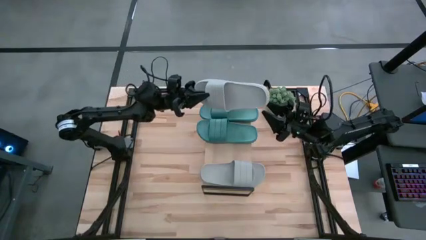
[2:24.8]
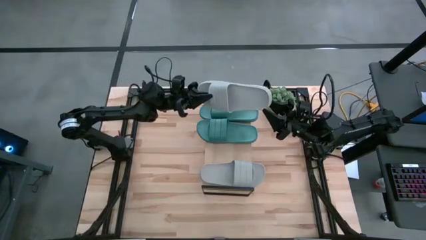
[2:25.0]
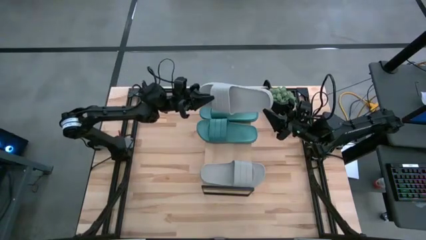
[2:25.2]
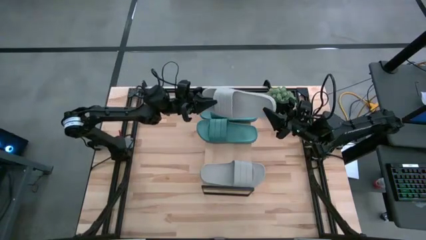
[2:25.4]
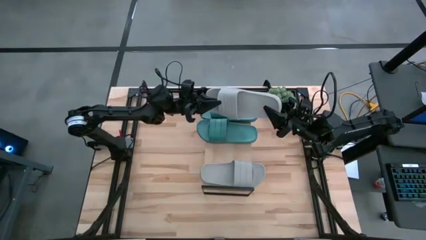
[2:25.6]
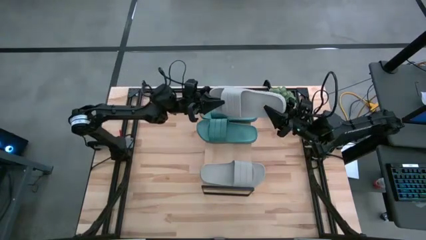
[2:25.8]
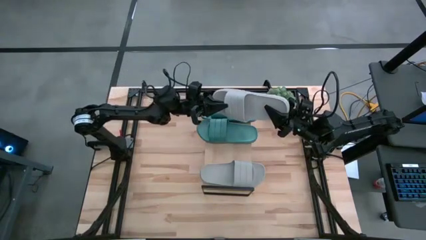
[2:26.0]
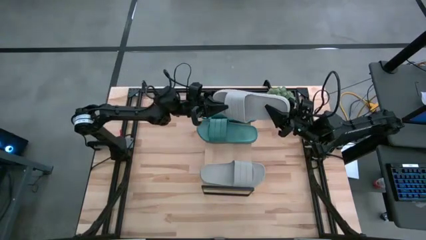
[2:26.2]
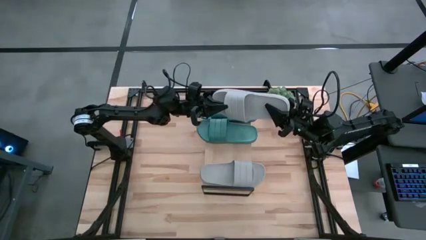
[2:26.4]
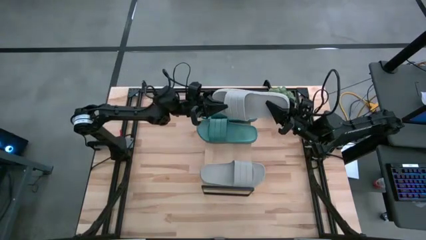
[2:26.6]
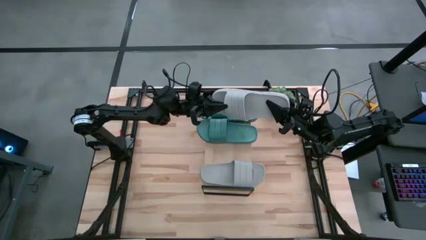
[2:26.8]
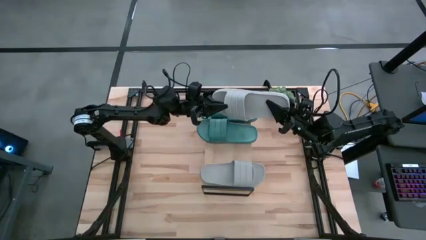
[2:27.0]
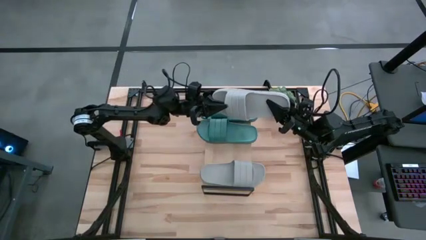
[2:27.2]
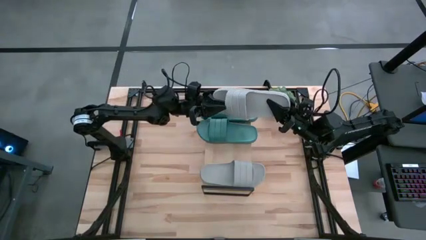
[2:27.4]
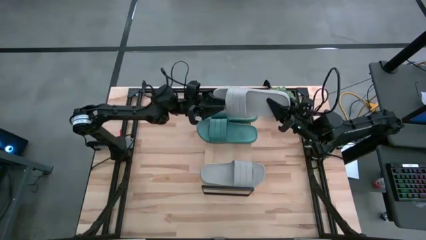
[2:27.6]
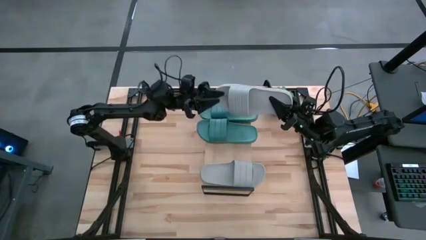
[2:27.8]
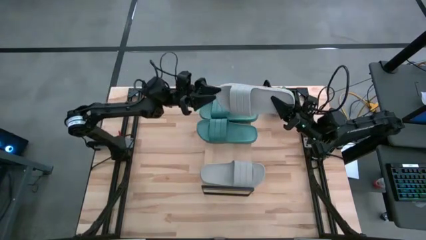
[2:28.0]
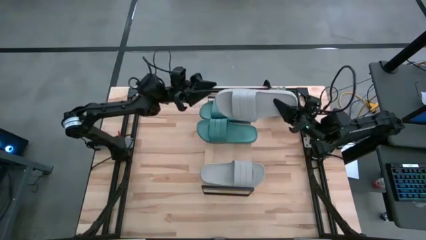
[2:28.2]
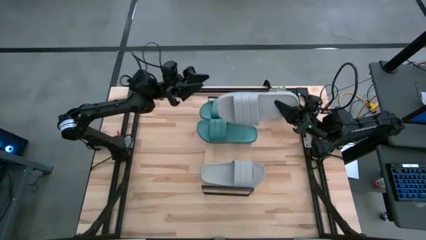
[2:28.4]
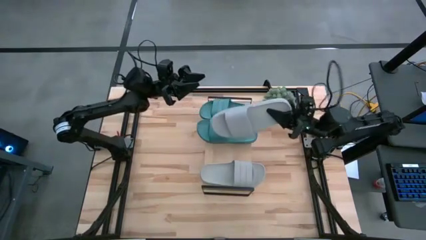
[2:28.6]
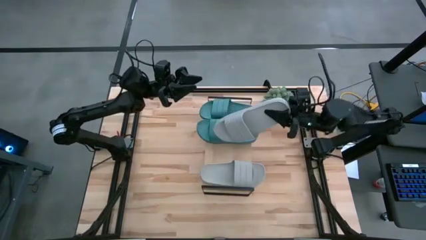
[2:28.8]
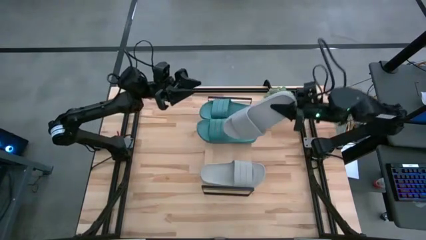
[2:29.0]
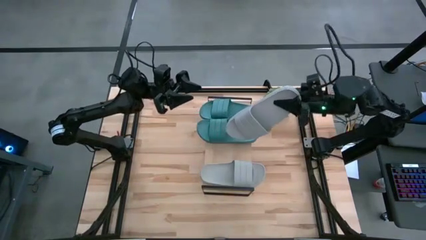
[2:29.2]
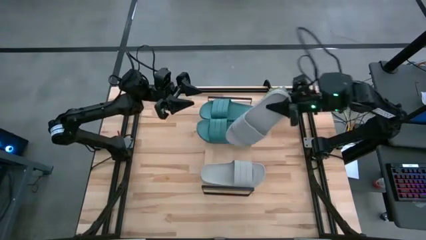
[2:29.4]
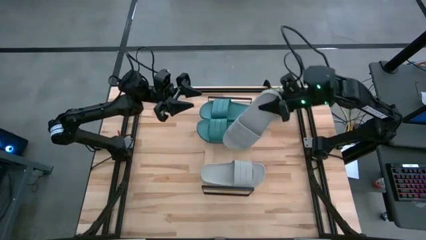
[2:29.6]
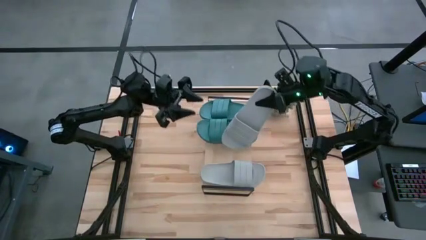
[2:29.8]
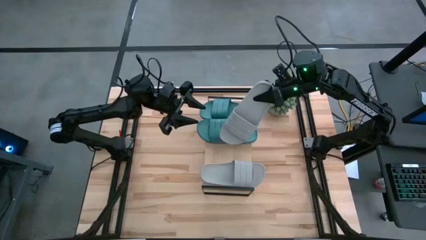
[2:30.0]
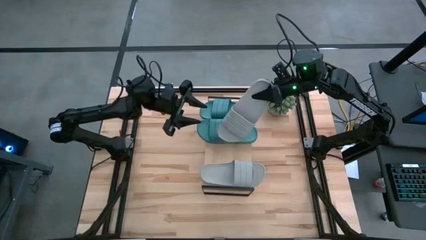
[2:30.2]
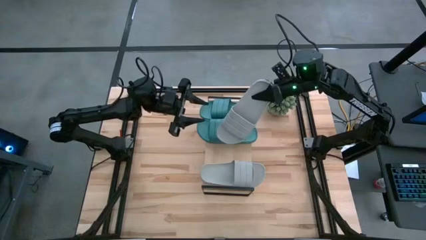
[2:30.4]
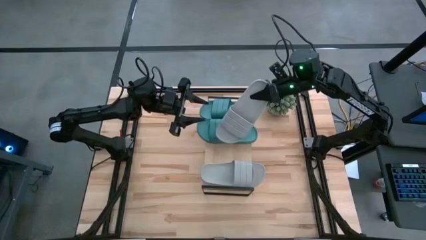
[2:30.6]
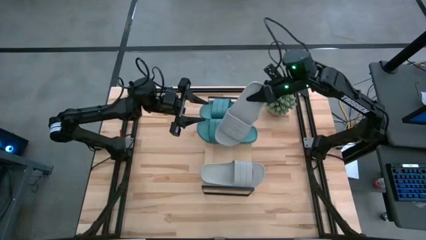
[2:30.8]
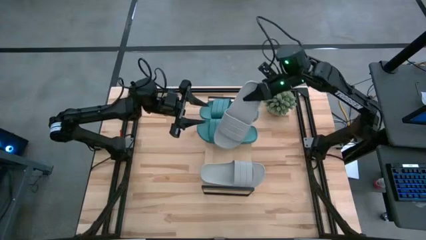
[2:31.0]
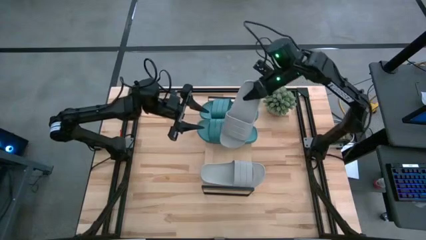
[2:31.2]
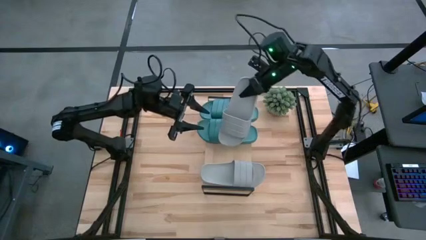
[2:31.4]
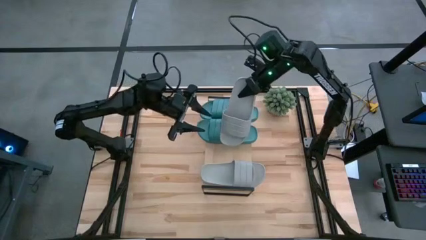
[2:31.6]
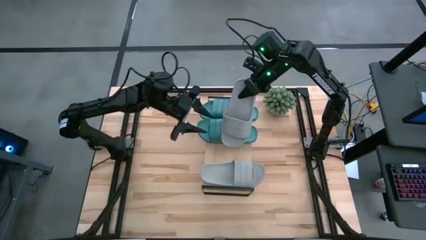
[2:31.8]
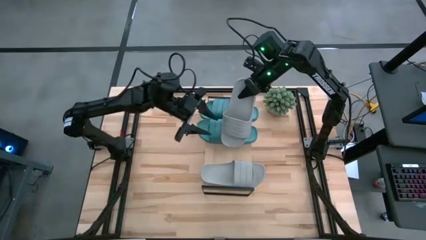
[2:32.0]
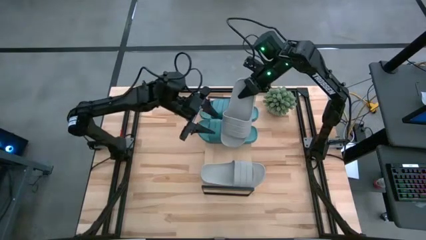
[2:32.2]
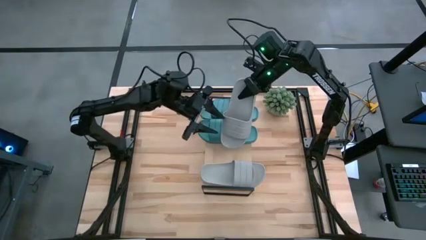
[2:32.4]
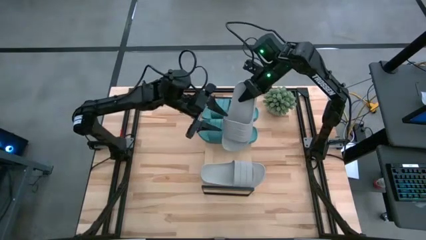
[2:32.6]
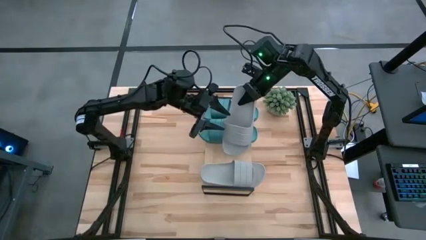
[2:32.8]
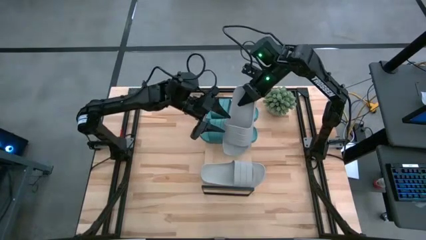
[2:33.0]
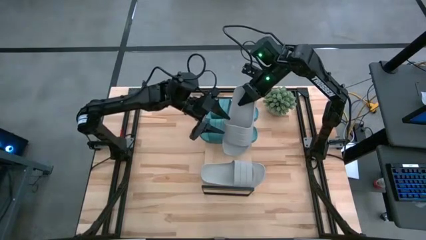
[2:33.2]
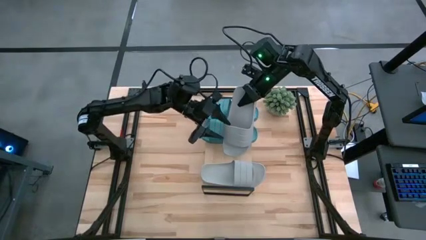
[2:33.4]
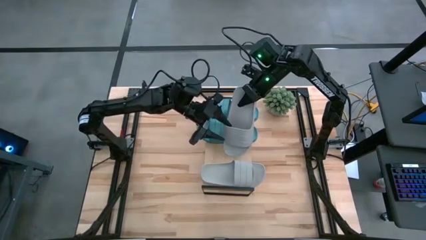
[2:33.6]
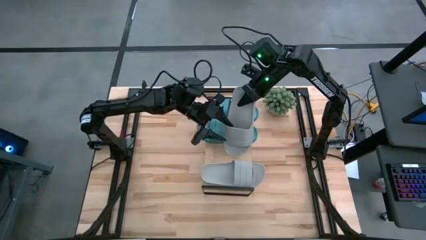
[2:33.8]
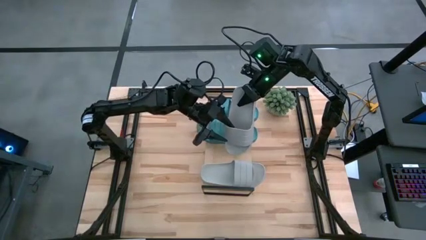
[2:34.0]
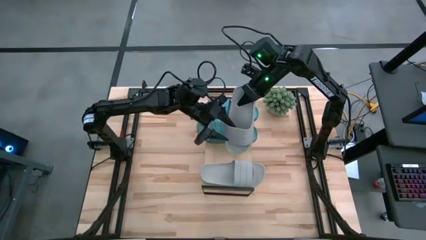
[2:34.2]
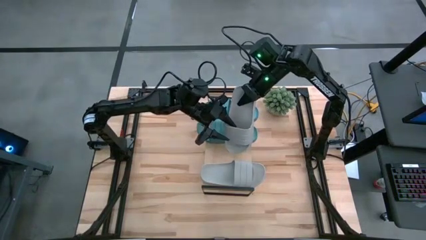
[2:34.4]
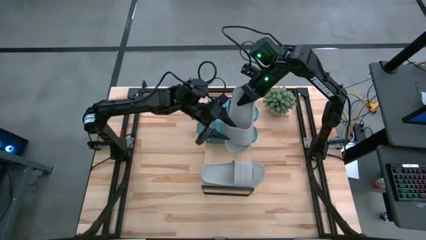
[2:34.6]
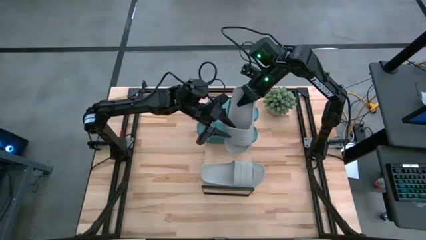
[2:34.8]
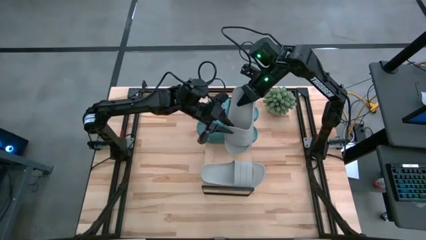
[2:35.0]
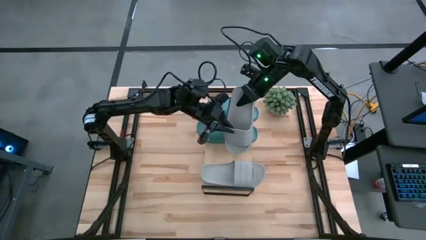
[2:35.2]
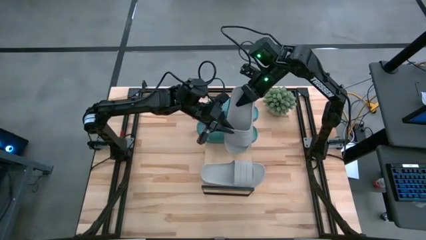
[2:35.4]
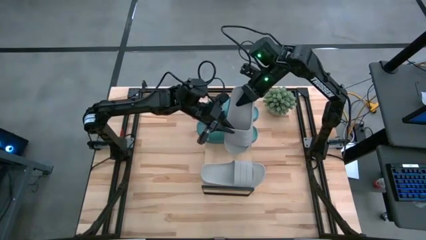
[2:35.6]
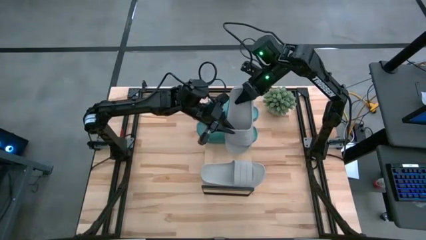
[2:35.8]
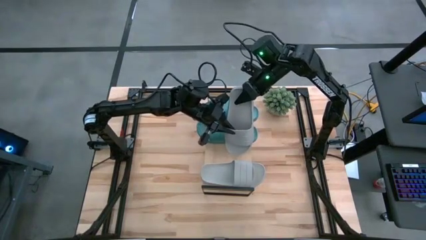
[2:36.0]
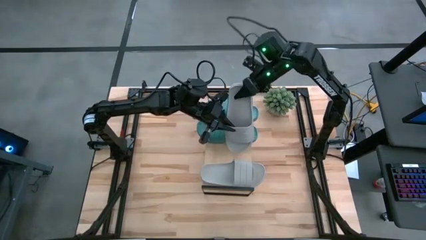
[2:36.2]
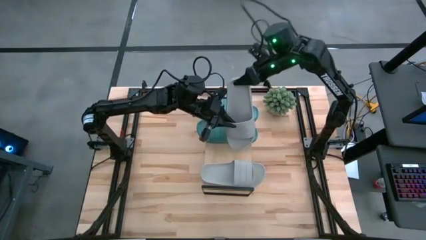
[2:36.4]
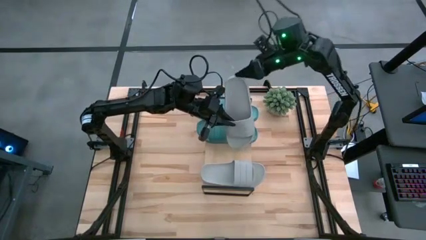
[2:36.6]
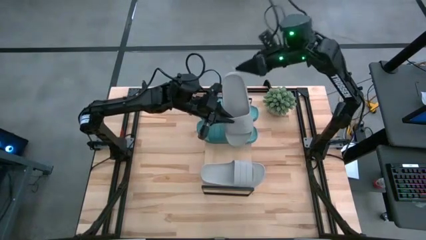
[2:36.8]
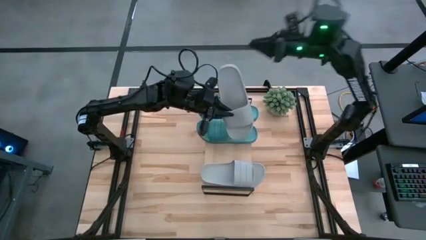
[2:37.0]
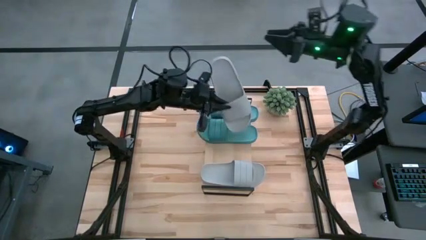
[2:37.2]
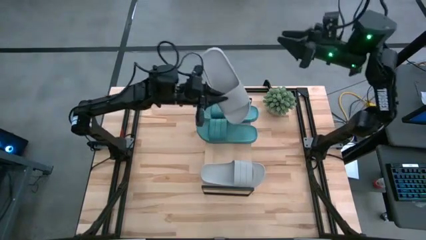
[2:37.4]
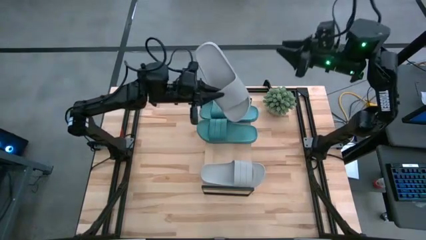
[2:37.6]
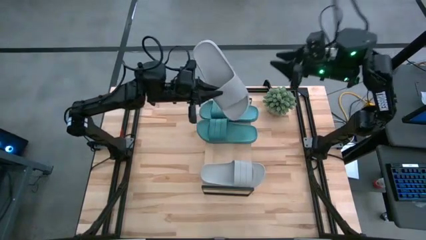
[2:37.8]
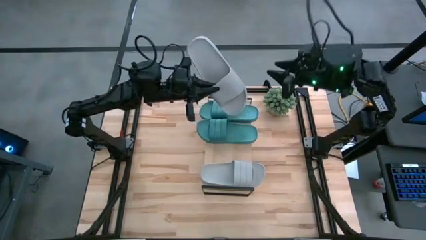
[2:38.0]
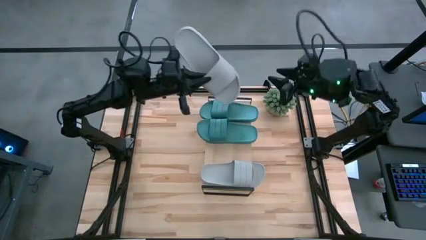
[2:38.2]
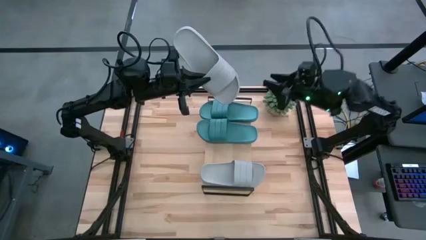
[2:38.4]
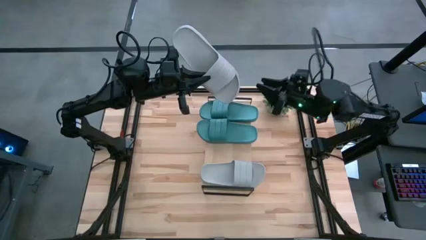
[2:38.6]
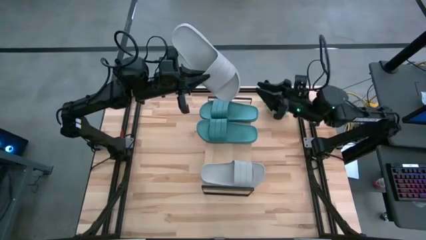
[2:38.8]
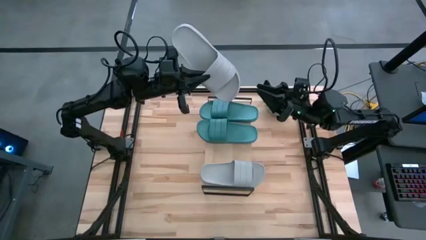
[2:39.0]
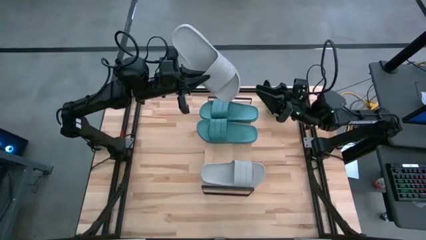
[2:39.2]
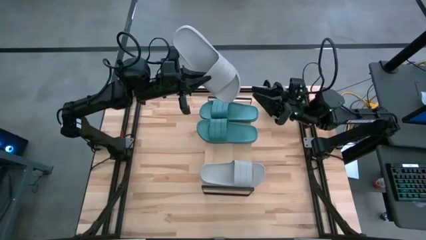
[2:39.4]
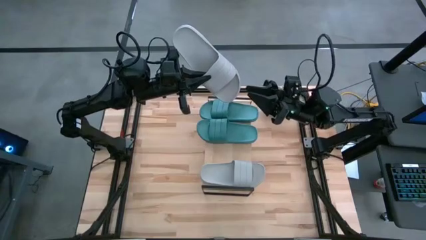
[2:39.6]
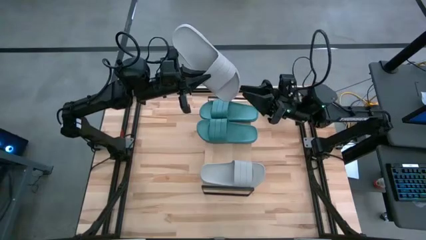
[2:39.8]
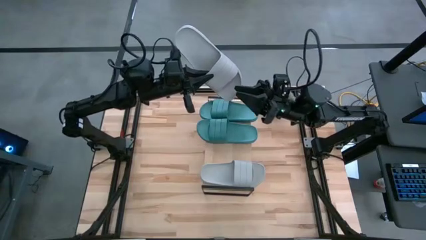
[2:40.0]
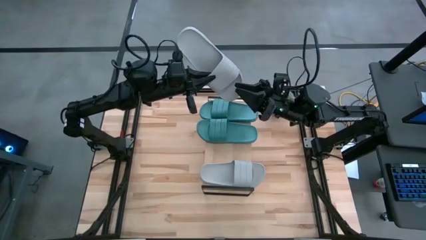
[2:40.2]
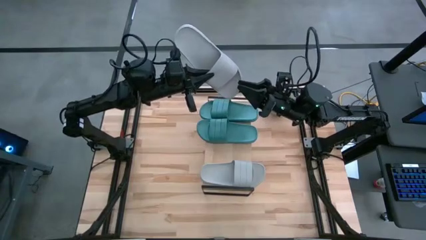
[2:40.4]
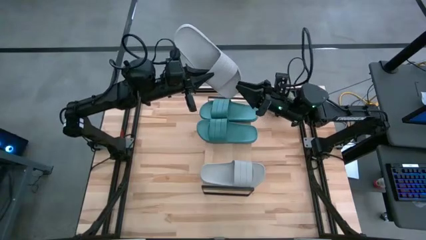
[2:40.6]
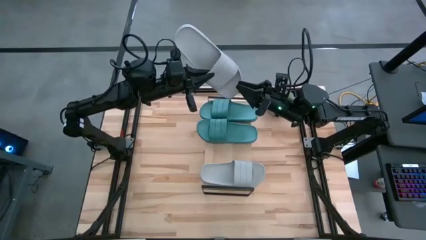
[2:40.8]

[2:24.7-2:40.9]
Task: Pick and place slides into the shelf
Put the gray slide on the shelf
